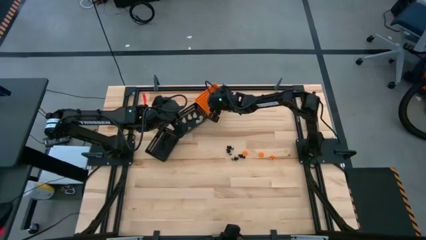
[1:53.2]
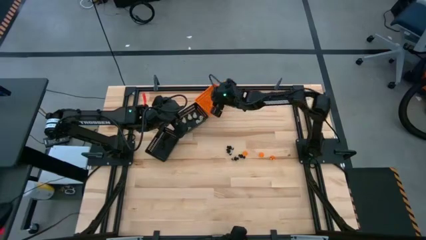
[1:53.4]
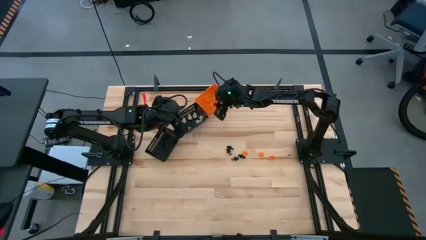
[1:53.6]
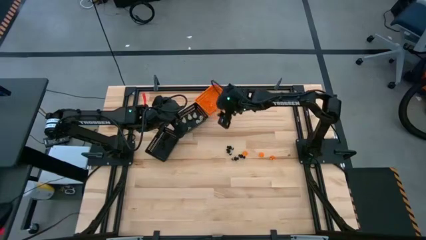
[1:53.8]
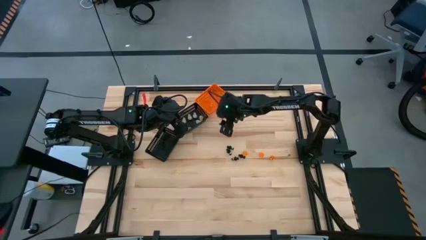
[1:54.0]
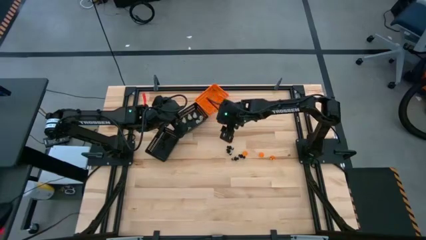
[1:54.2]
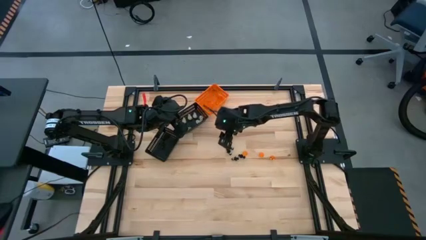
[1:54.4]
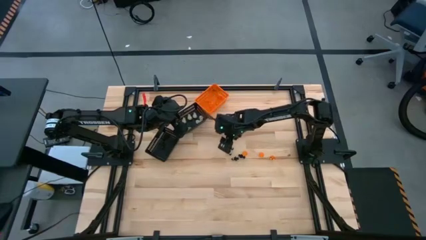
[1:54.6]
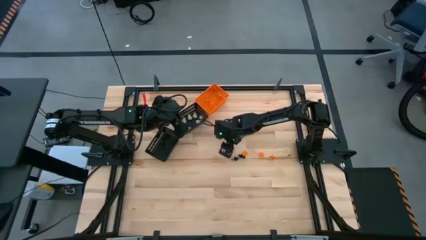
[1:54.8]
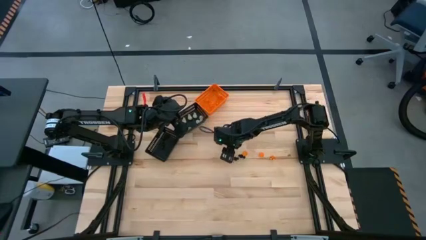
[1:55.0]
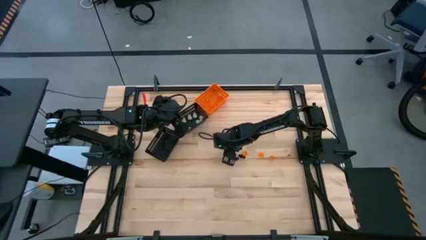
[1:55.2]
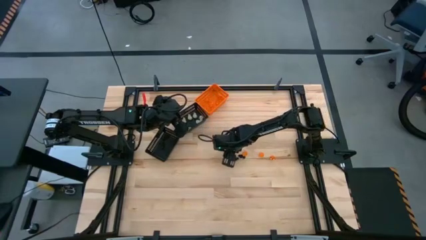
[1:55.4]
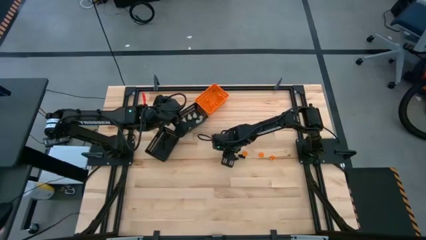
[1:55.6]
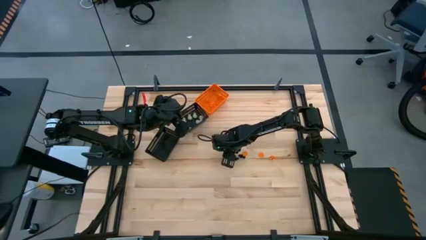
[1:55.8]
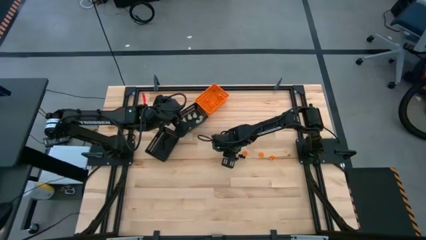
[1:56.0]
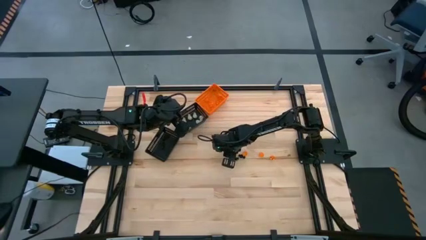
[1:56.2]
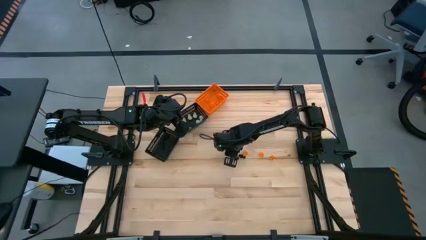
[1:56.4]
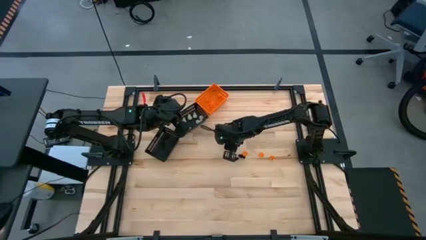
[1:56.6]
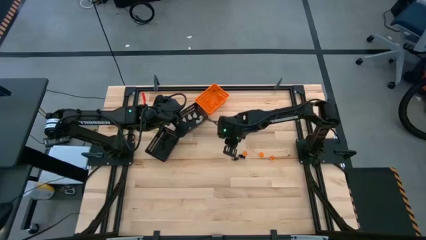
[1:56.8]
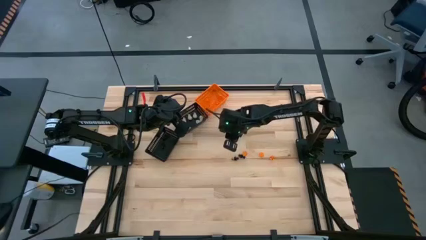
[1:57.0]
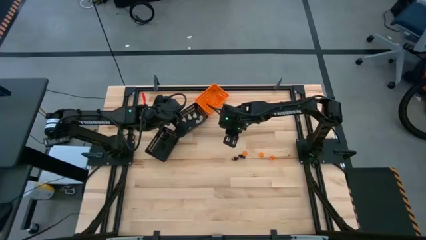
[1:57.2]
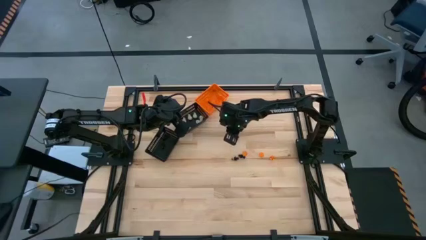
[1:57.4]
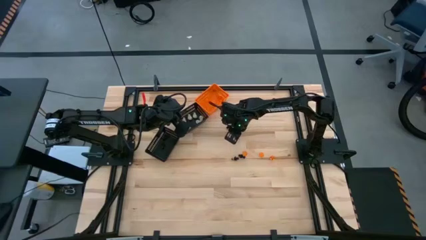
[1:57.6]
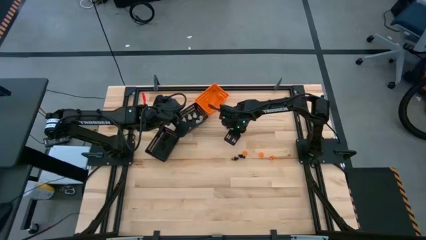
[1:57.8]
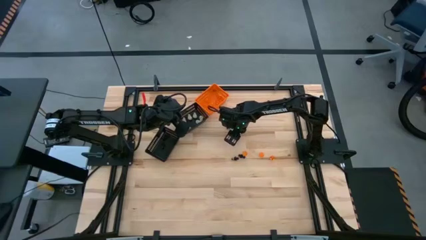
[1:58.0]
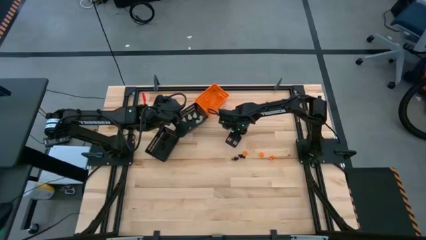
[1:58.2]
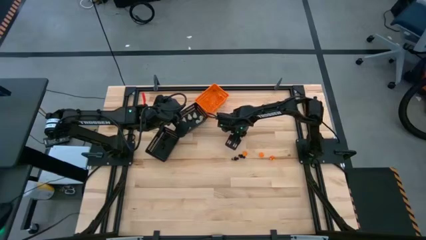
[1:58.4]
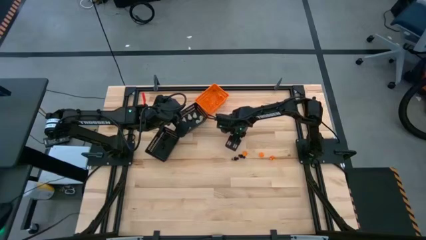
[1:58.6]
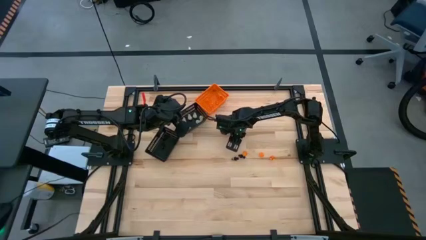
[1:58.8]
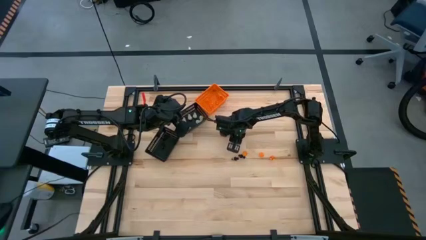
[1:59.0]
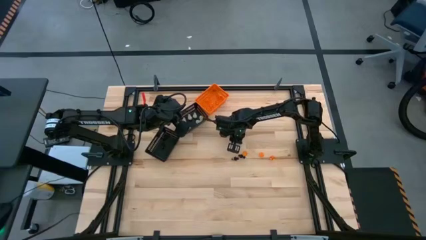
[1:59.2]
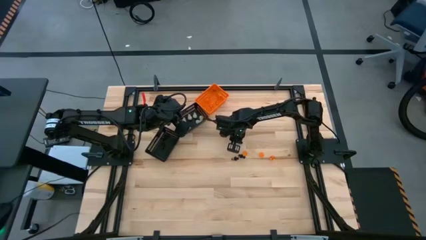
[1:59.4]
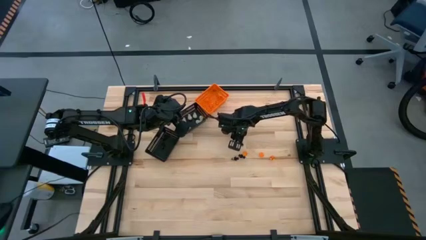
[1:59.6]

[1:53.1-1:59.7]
Task: Sort Halloween decoration
Put the black voodoo toy into the bottom black bin

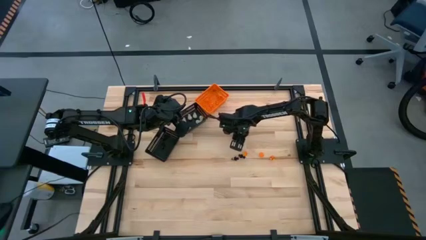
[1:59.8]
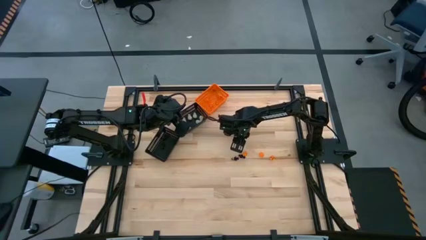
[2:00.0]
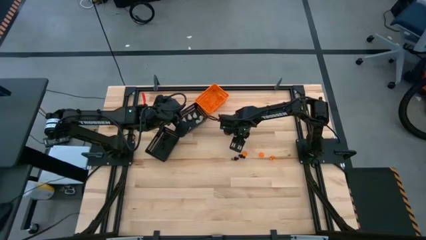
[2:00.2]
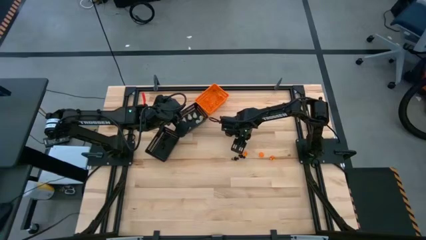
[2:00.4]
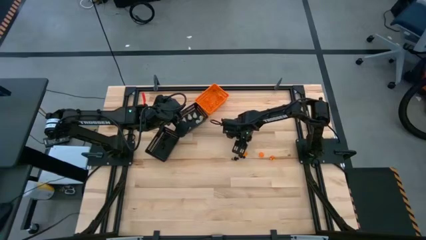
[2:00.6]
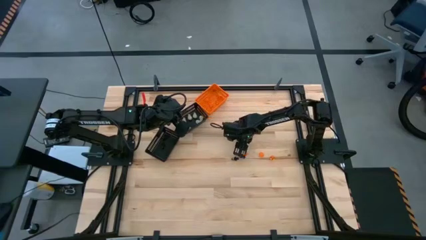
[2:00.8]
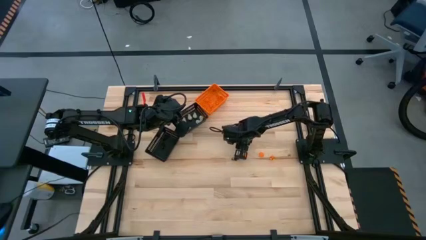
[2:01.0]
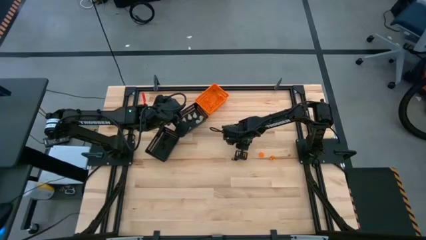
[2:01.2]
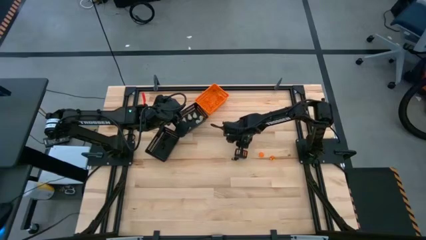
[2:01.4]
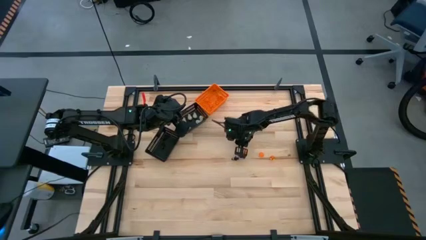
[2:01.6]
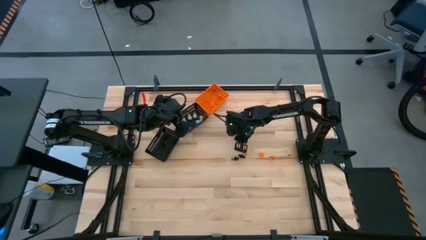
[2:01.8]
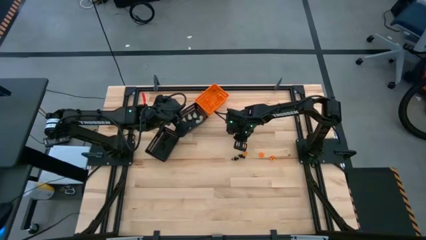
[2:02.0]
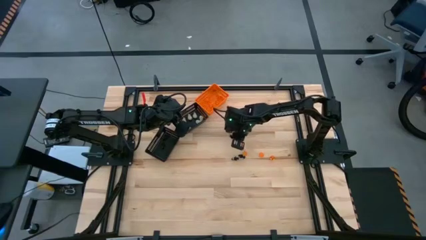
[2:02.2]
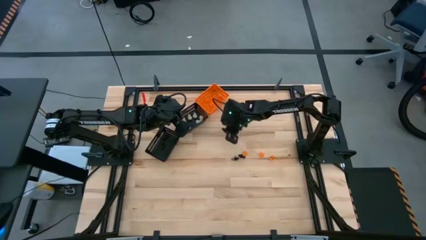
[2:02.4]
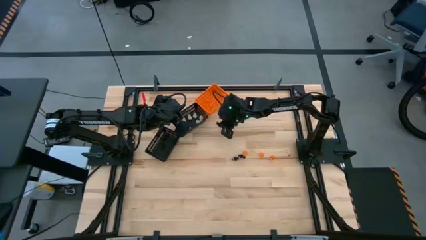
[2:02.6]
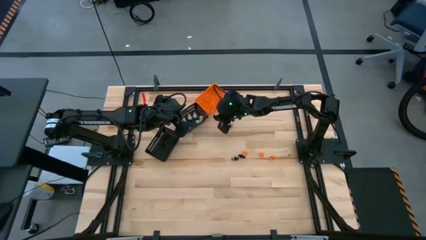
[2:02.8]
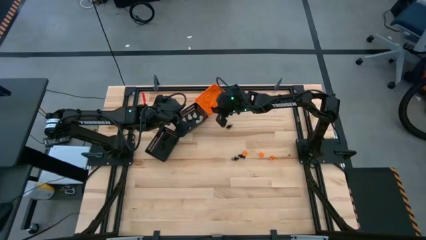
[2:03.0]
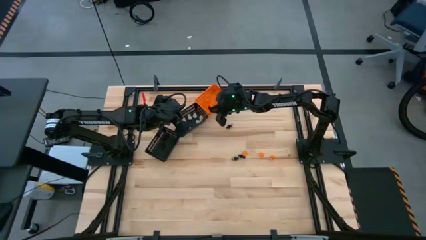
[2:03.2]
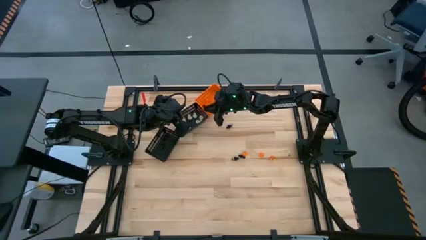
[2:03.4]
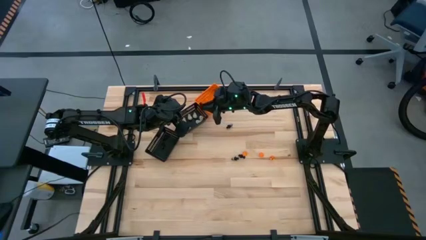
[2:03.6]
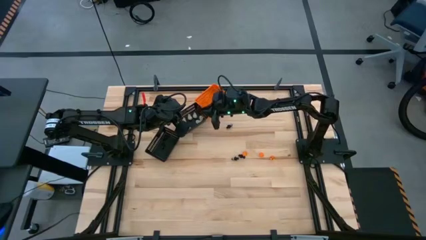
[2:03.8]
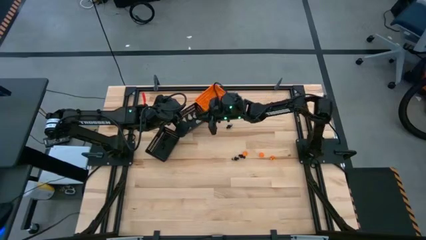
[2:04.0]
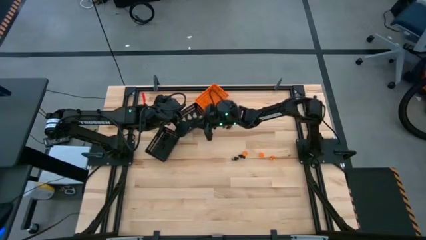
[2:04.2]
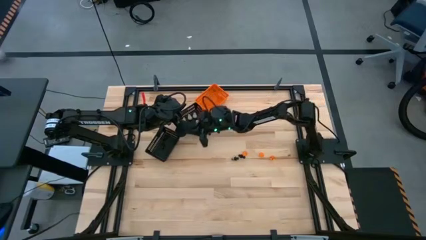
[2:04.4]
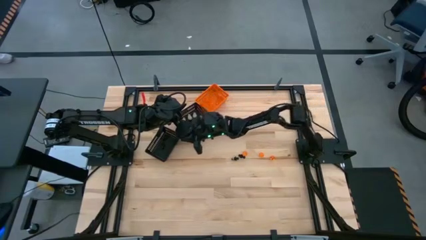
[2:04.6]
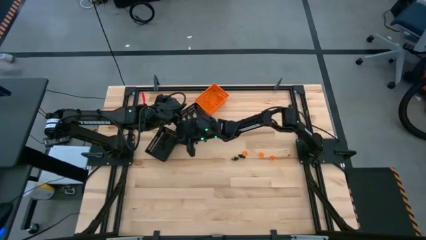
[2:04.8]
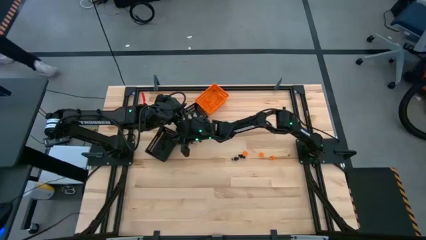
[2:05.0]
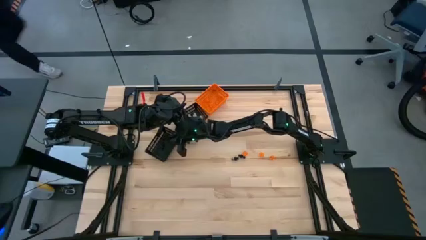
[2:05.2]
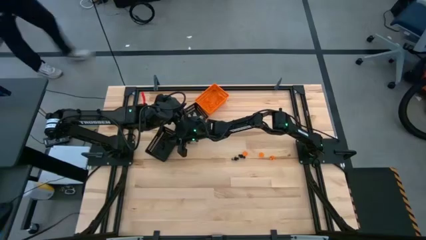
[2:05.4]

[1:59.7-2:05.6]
Put the black voodoo toy into the bottom black bin

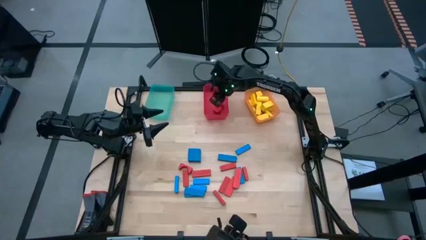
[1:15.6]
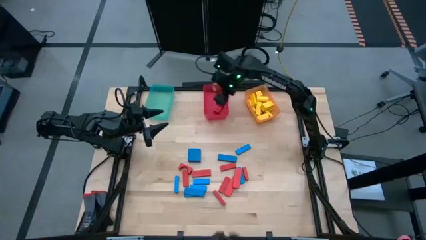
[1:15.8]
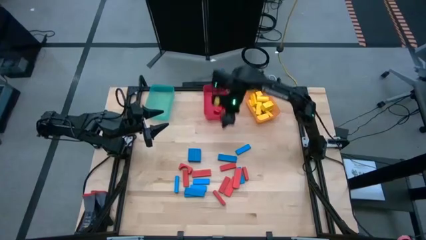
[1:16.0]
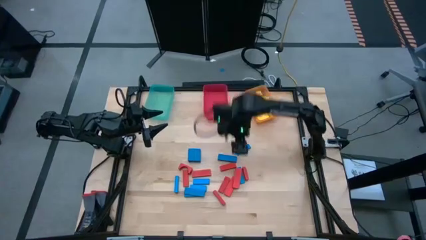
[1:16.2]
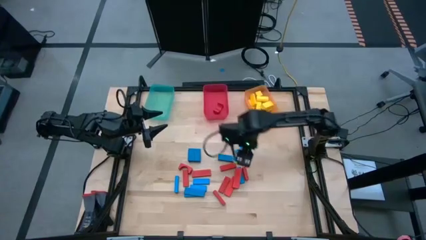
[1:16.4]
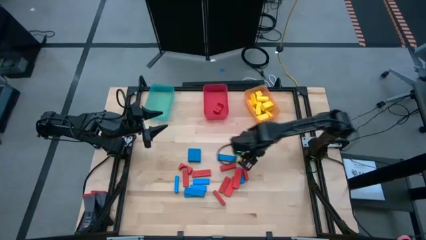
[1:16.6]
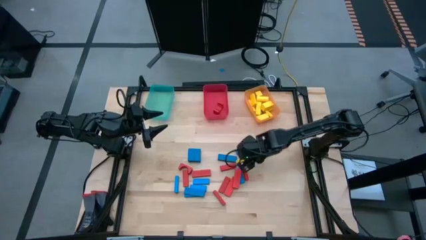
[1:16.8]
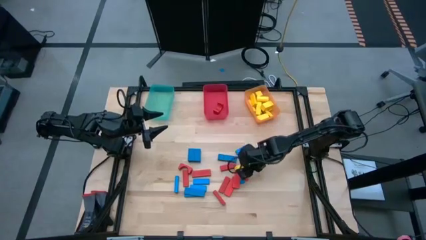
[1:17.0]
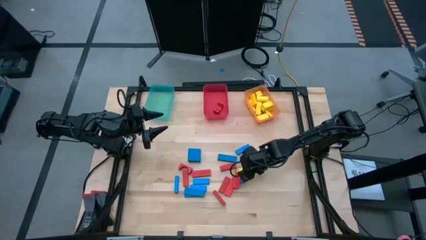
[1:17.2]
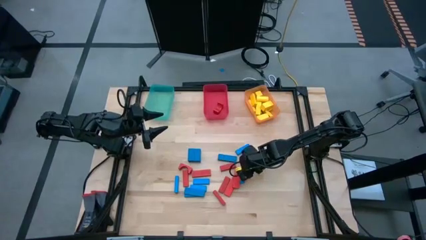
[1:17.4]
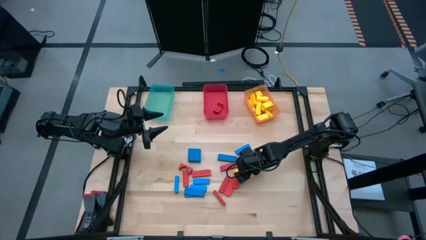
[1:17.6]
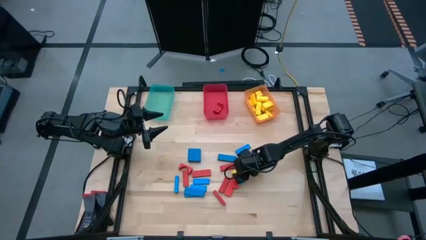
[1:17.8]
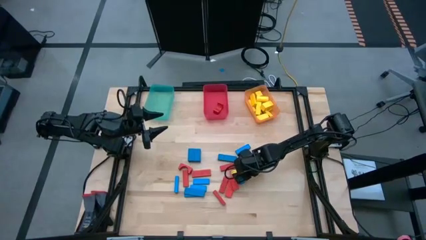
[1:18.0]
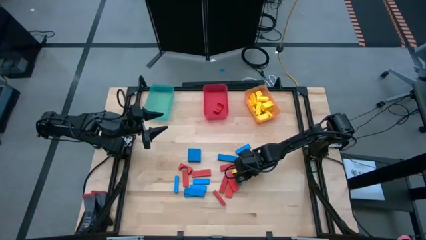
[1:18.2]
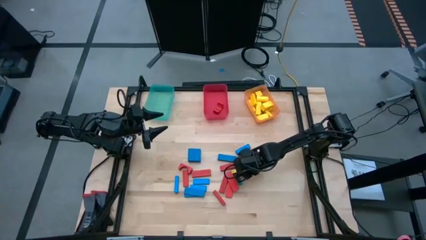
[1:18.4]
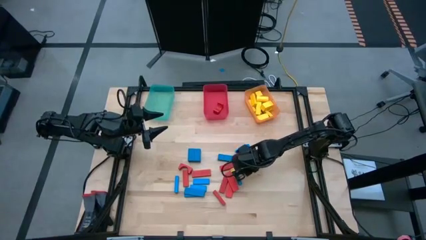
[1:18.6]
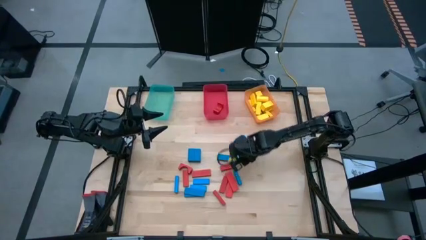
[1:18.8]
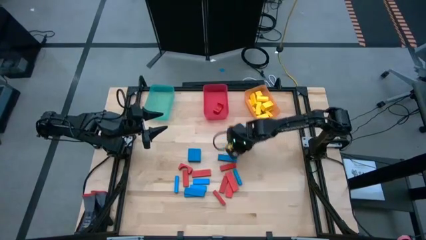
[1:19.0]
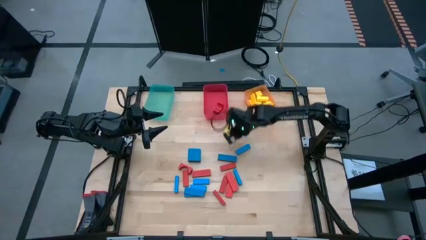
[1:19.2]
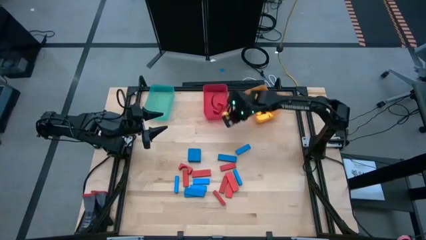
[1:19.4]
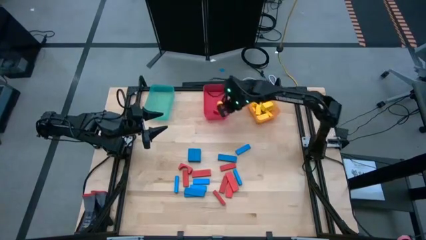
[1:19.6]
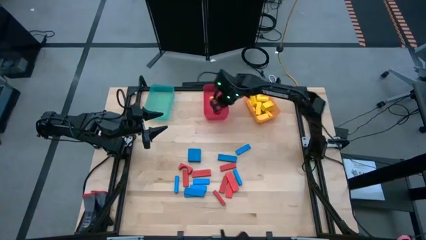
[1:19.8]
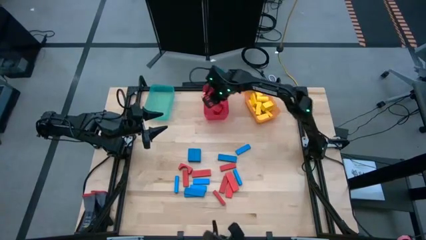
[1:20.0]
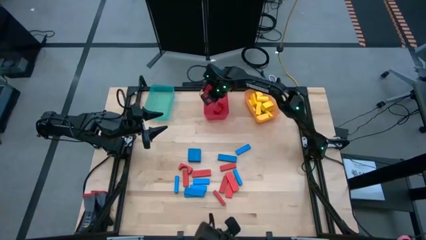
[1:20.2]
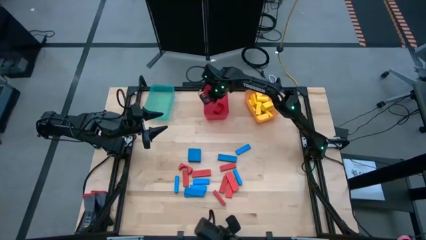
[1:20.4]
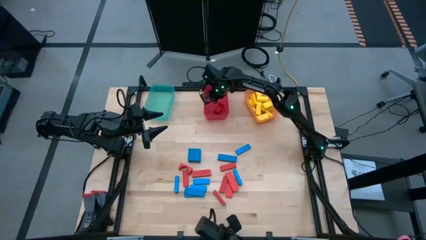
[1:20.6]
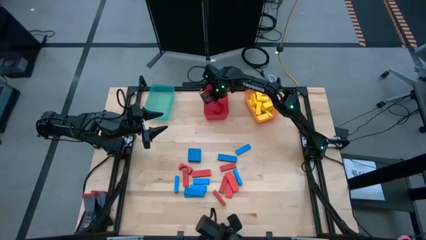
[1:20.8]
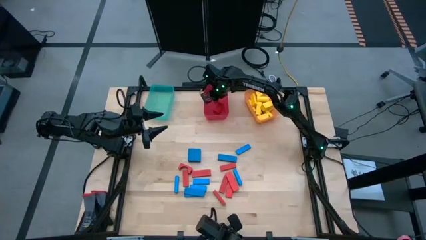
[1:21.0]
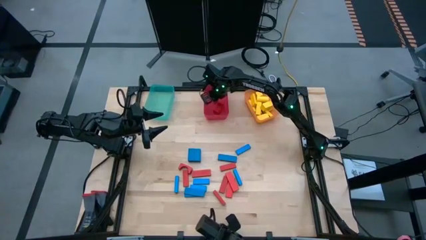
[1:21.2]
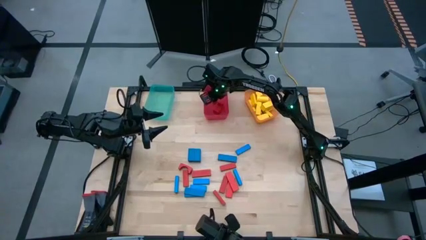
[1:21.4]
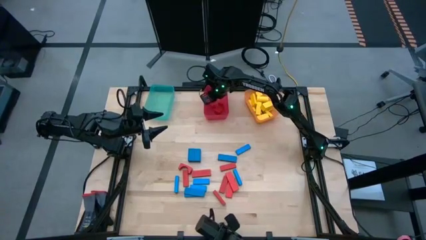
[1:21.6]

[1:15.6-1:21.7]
Task: Sort blocks
Put the red block into the red bin
